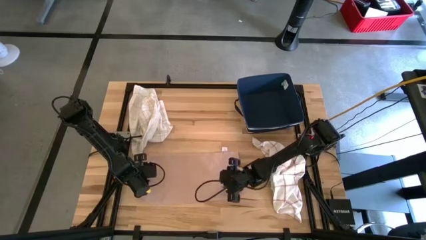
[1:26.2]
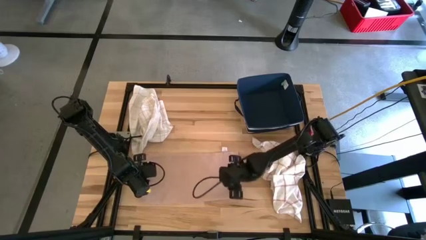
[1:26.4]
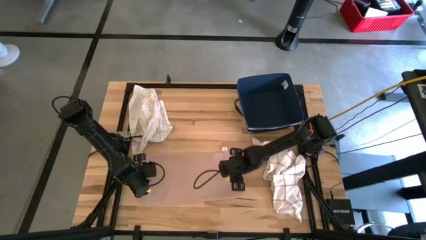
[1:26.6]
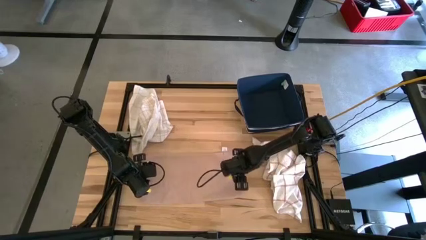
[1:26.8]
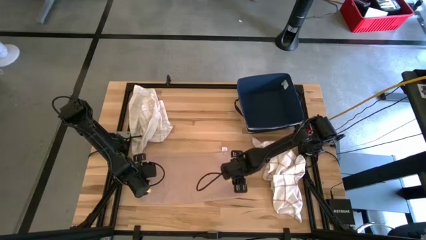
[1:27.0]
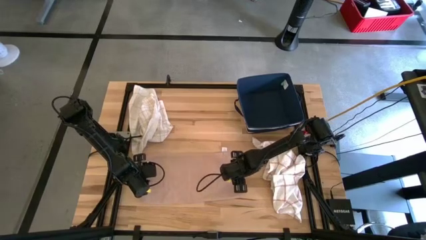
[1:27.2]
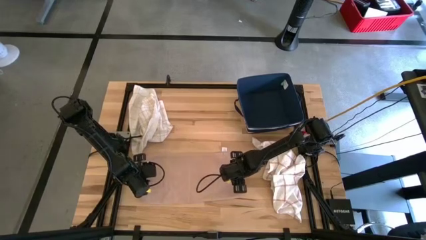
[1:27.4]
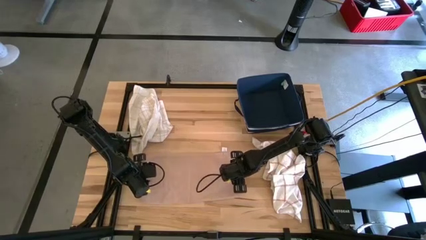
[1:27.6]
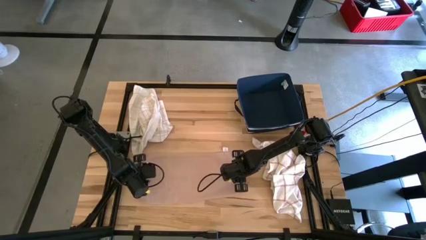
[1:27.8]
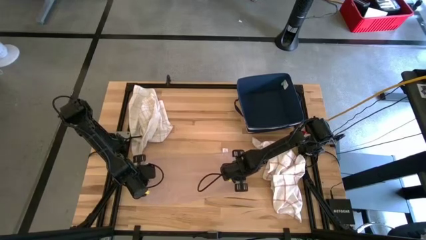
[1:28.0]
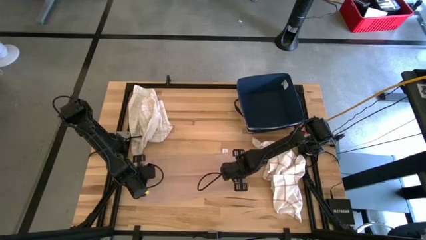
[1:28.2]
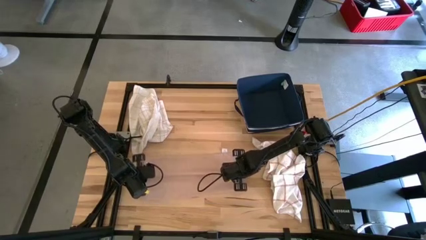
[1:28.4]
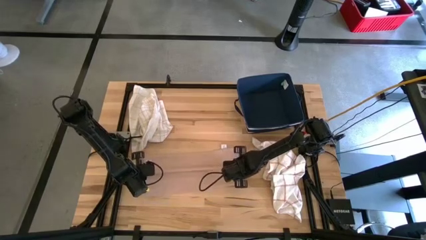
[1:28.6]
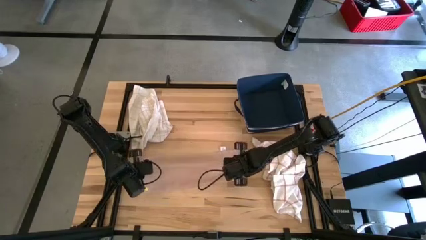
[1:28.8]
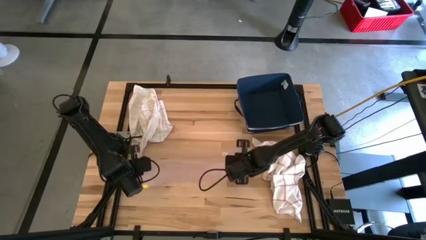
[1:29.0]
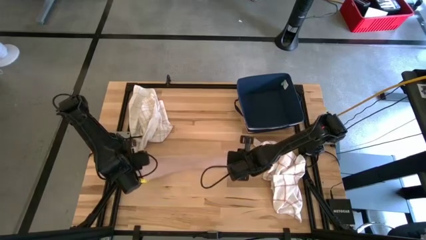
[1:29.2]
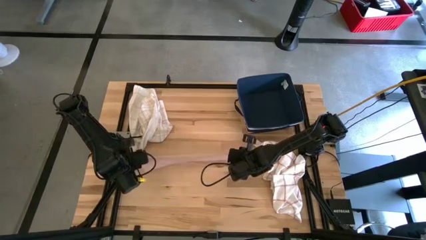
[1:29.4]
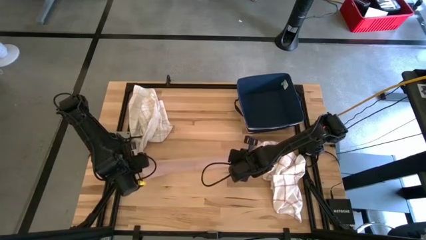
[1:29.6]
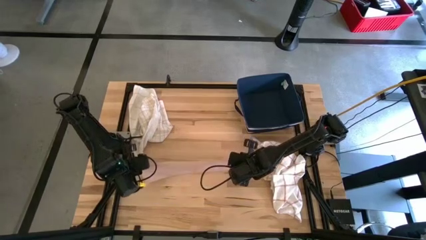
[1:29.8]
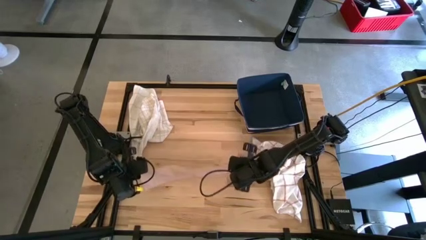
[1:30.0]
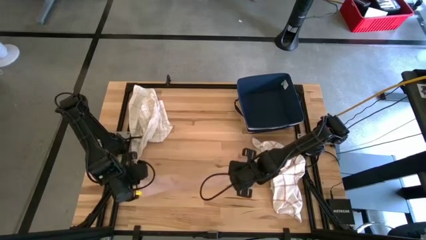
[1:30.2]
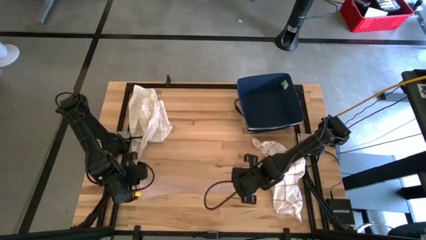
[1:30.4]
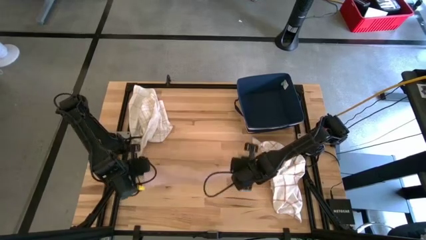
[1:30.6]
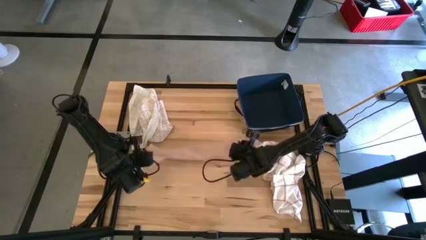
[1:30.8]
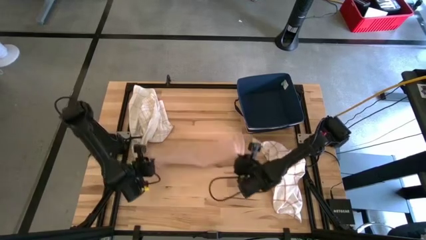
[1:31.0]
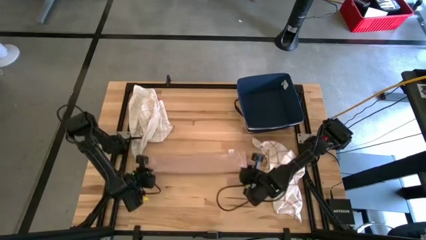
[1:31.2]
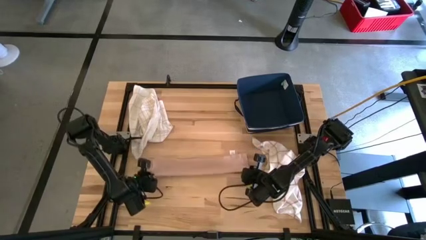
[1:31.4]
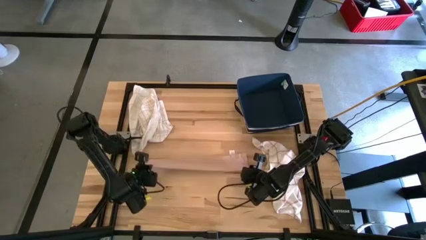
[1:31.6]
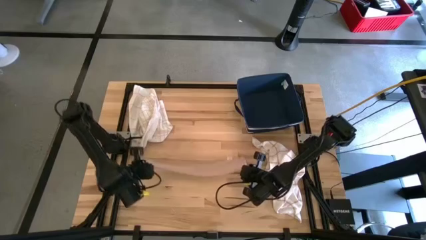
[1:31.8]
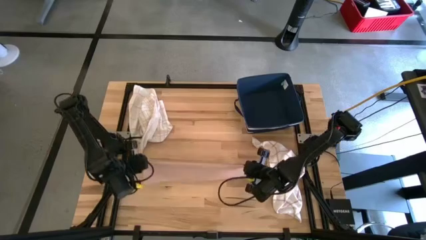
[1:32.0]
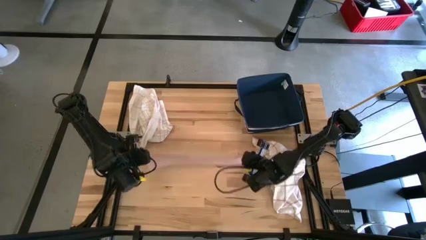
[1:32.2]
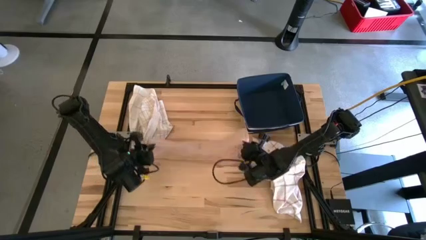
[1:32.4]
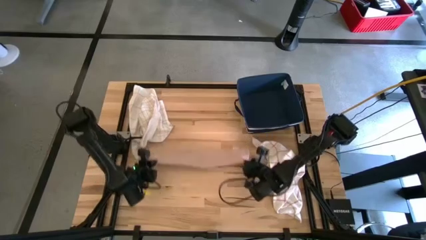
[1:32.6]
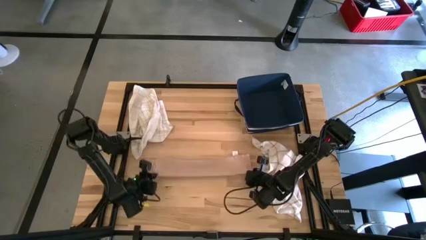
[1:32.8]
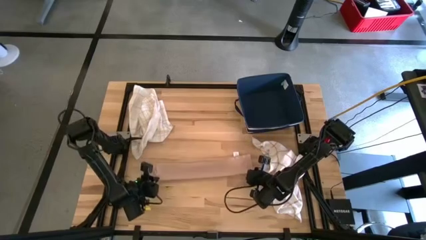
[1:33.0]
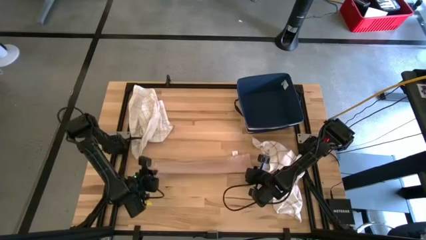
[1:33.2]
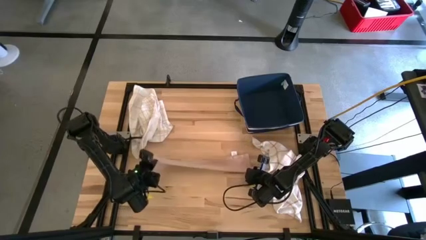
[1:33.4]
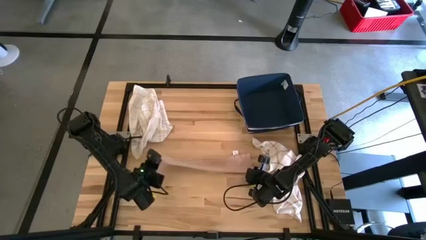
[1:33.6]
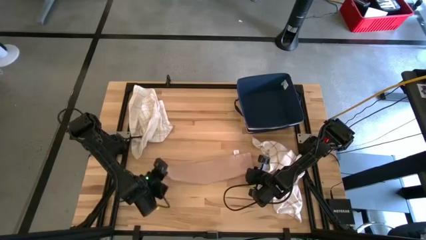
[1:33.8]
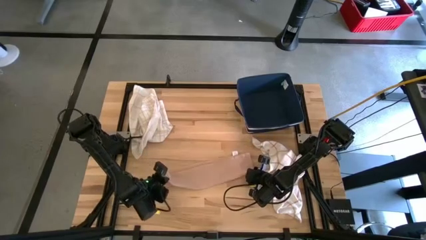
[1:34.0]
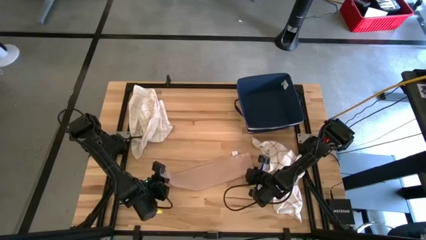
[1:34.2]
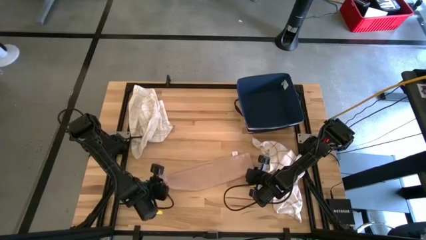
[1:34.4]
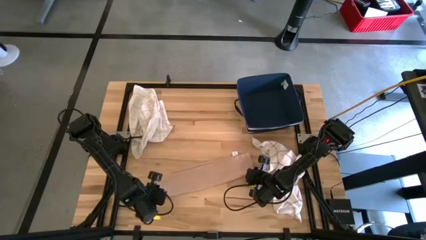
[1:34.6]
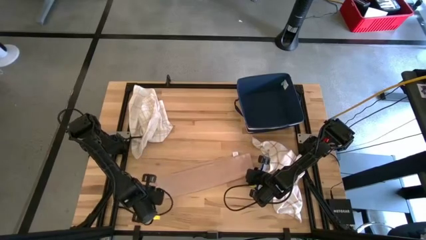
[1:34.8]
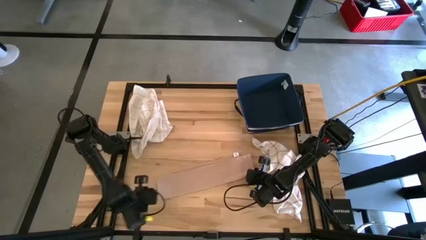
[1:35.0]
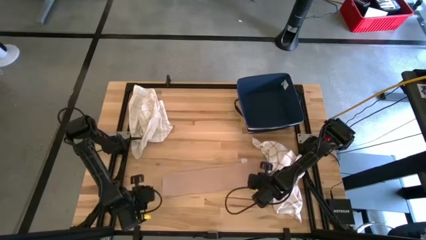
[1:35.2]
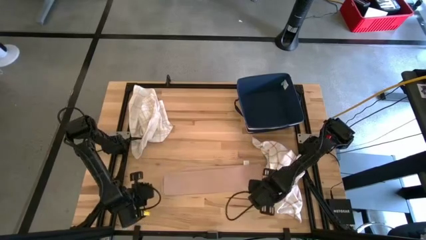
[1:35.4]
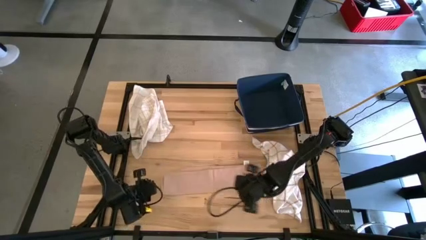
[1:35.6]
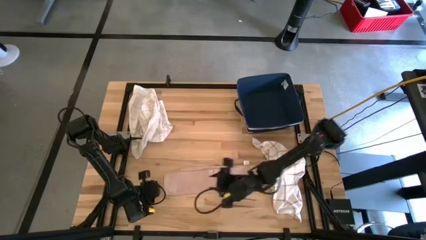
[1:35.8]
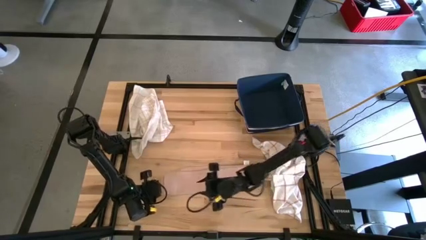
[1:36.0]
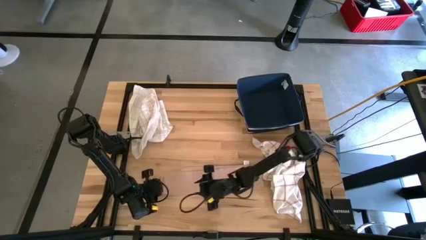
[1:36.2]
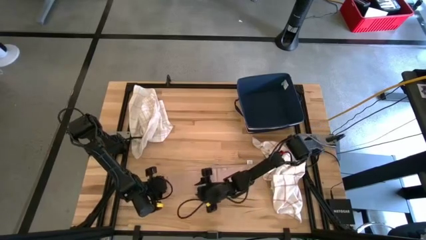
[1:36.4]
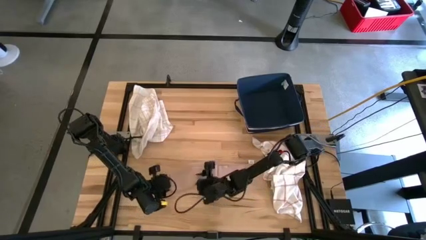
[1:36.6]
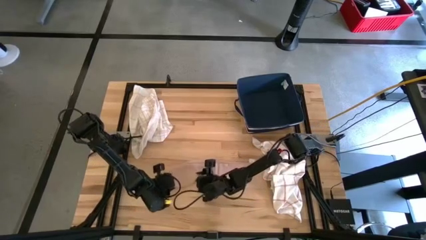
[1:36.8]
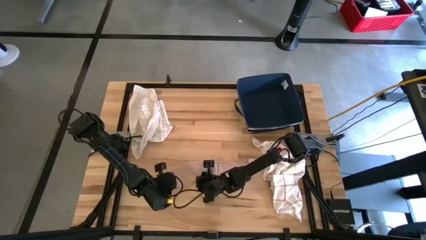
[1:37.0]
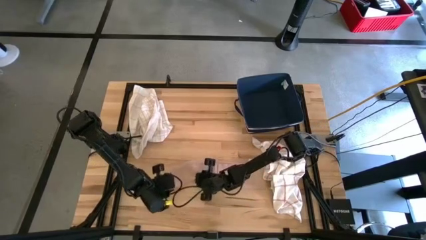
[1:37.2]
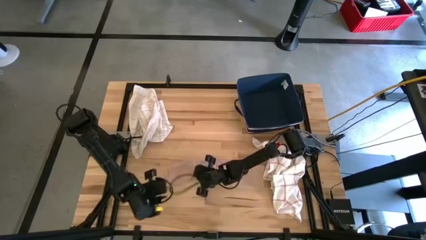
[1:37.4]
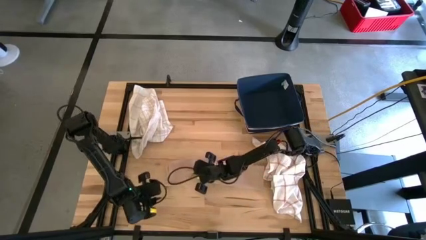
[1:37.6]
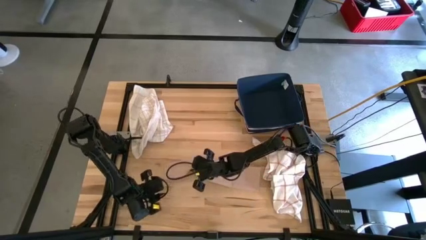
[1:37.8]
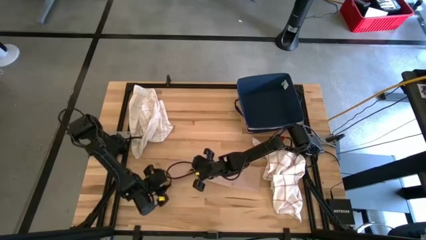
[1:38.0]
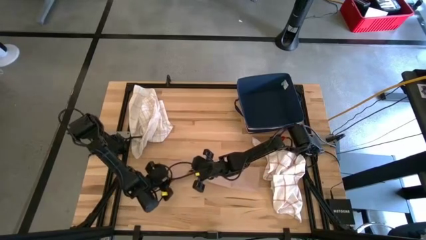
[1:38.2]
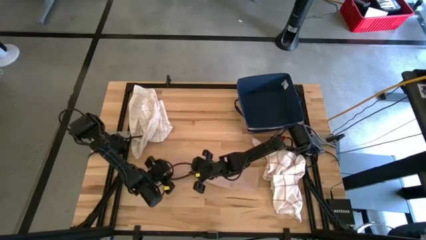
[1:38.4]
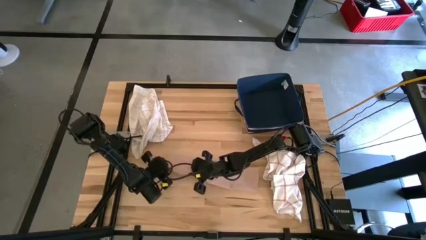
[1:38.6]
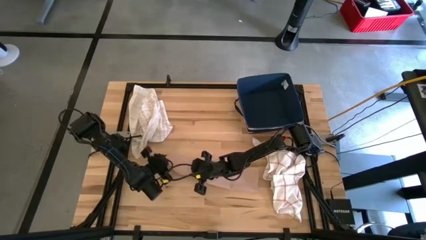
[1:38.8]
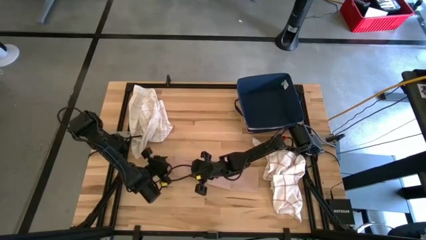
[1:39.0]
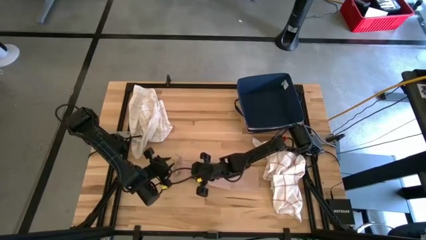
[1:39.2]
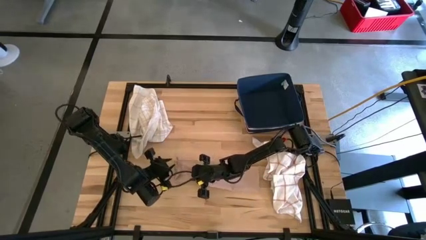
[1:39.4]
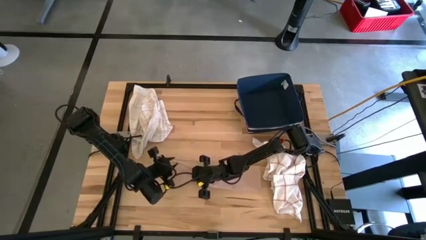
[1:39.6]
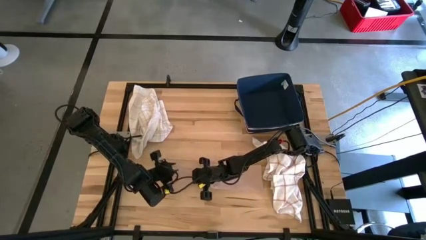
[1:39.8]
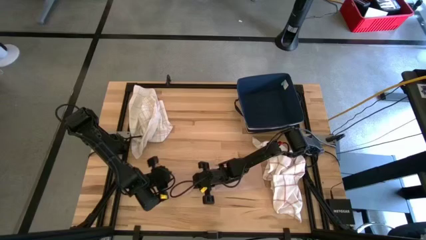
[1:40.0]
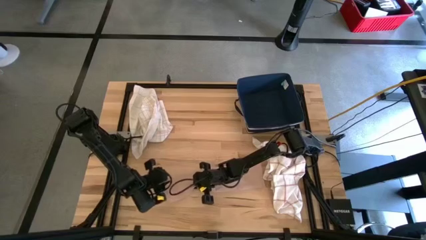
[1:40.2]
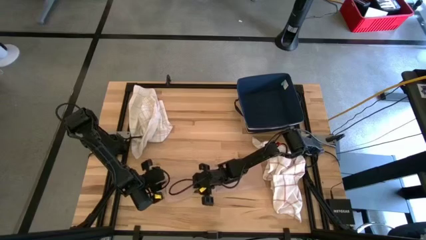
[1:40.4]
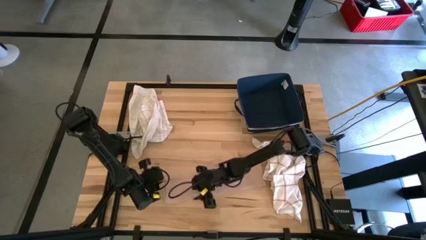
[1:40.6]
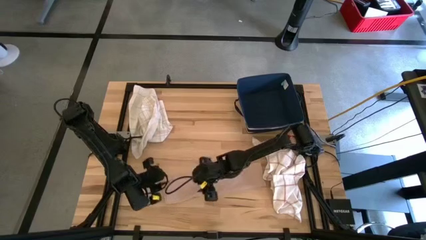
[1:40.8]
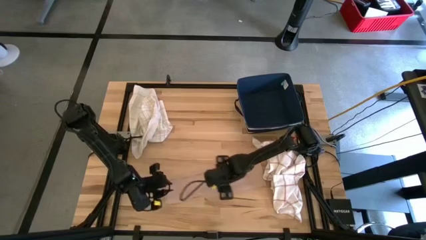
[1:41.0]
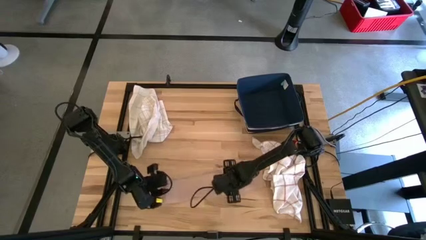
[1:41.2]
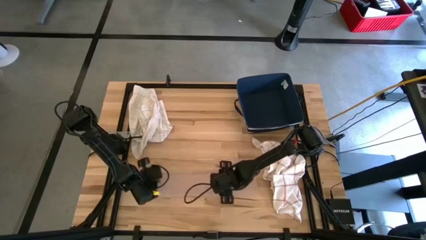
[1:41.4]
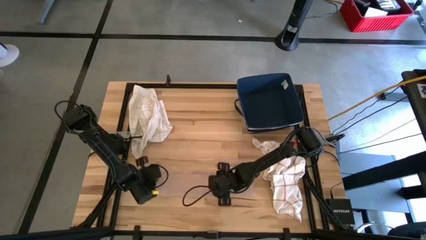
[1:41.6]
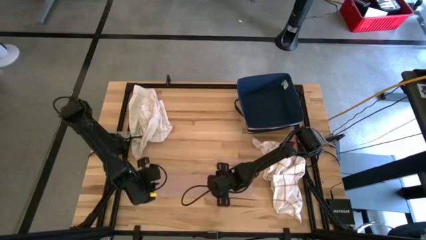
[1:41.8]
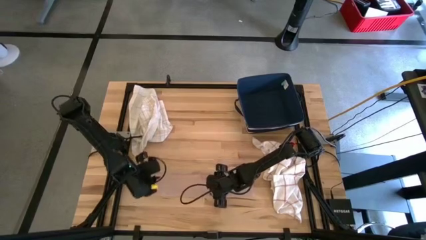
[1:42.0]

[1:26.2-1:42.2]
Task: Fold towel
Fold the pink towel

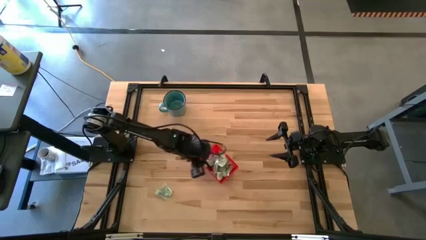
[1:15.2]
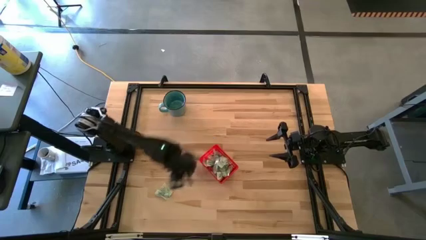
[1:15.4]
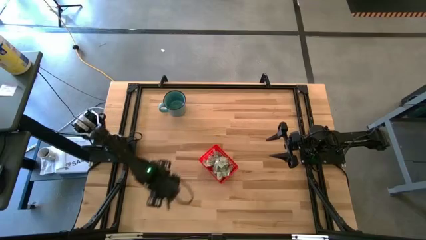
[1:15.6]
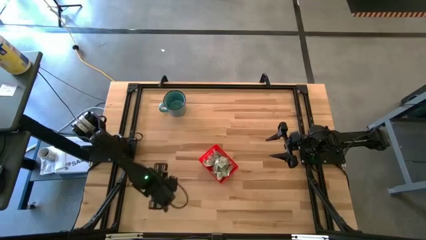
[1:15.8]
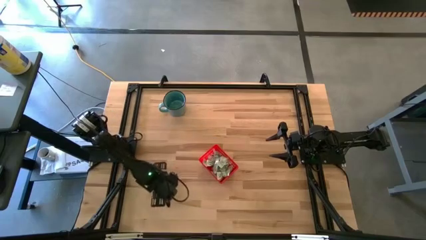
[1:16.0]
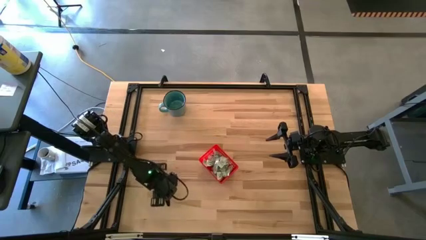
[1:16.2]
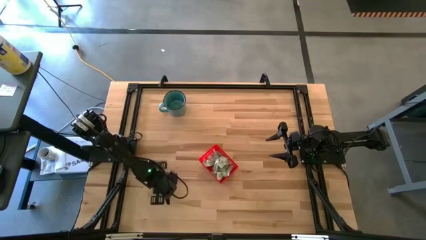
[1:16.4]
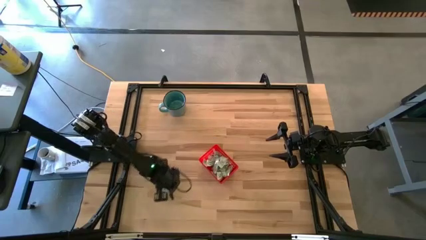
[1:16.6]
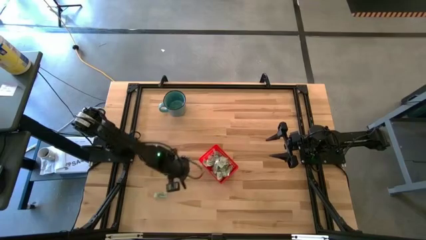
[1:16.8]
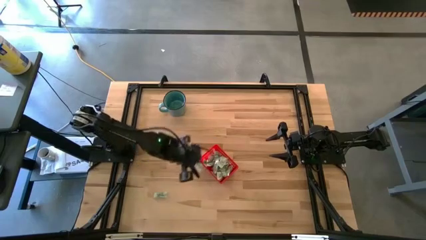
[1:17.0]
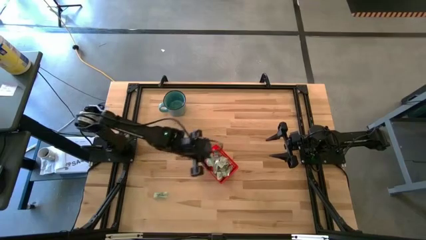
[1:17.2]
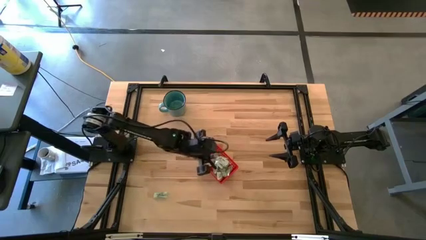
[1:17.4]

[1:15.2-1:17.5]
Task: Pick and place Stevia / Truvia into bins
Put the top white stevia packet into the basket
